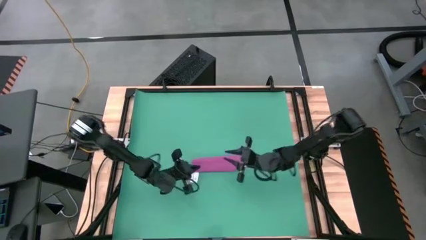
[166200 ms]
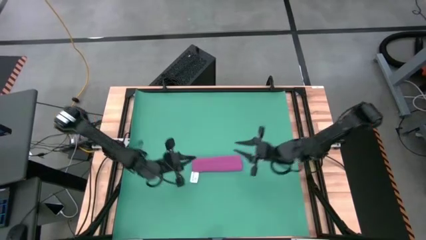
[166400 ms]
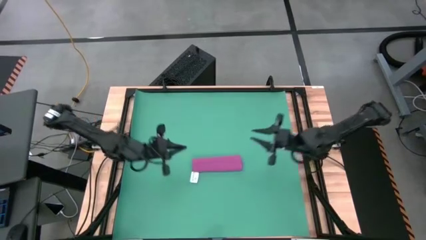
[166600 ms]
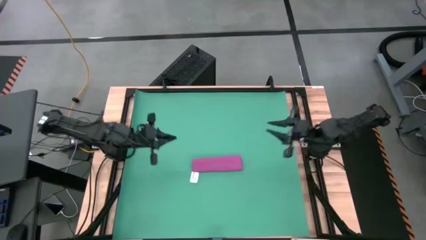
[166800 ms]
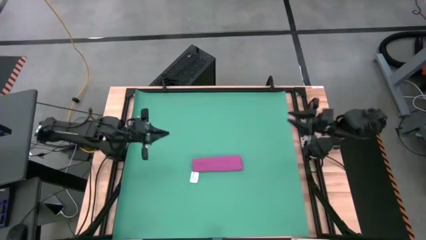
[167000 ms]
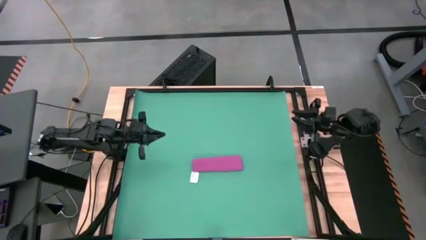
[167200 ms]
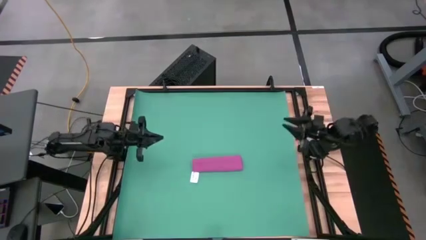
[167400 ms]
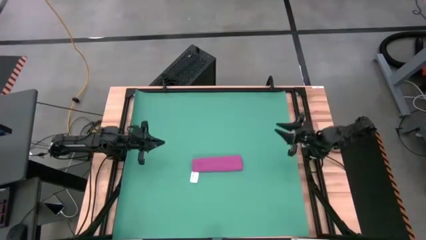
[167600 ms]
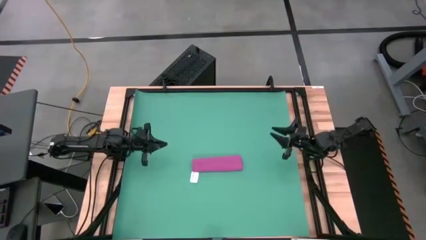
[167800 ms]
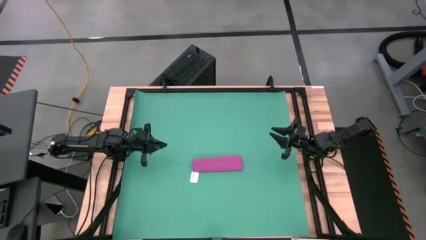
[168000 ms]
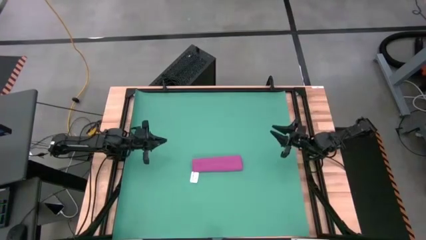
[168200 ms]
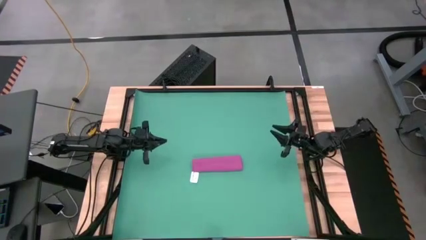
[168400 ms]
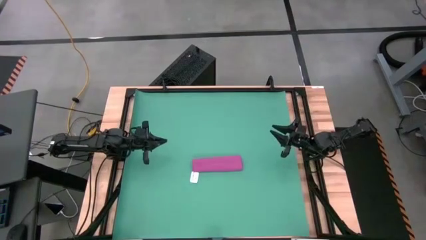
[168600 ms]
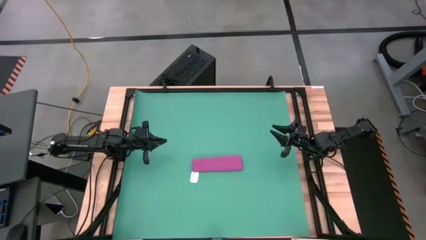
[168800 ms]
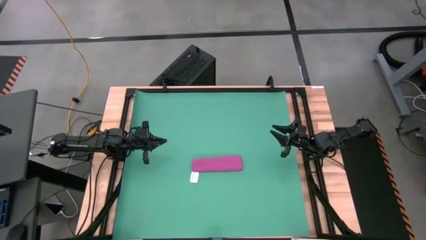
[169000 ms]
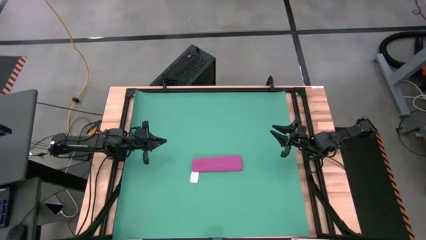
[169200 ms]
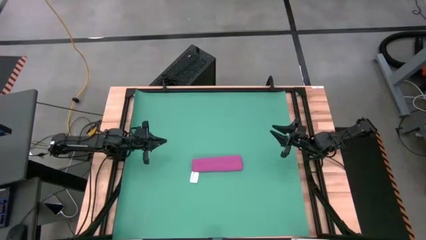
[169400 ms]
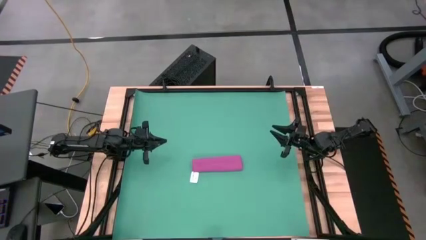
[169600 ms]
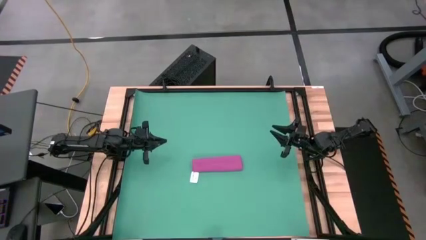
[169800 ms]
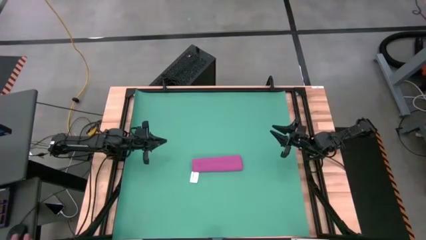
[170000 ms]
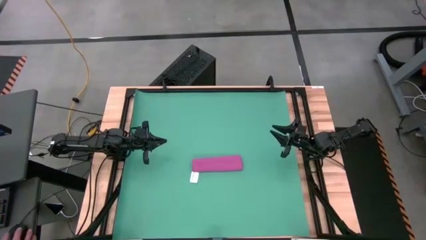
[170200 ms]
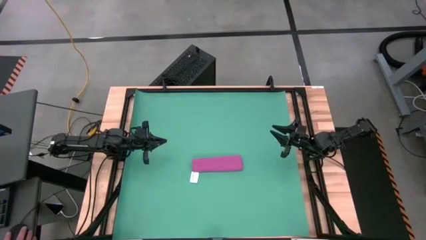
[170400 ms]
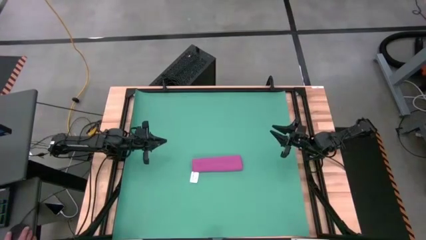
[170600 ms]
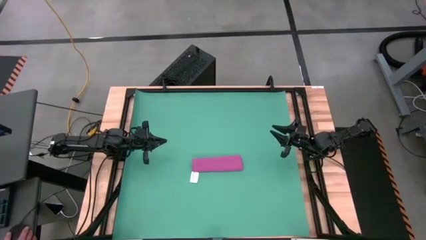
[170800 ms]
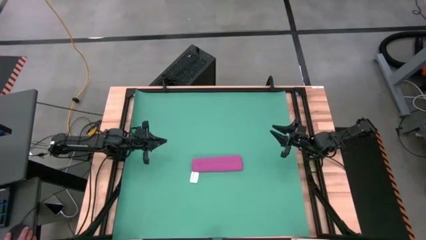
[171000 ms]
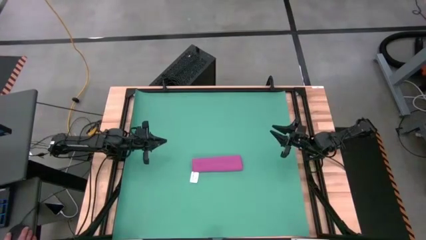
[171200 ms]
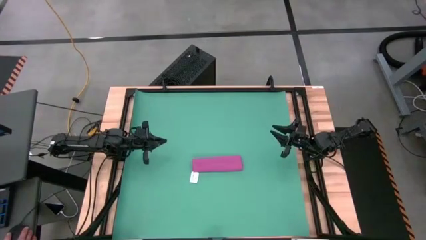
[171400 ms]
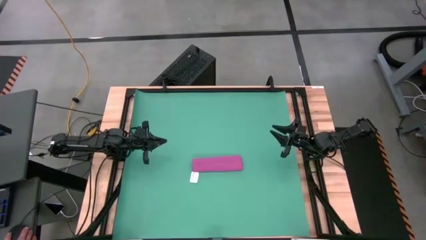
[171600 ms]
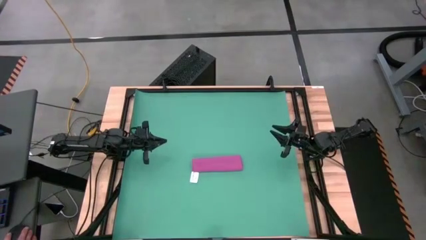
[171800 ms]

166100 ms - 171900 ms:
Task: Roll towel
Return to Home Position

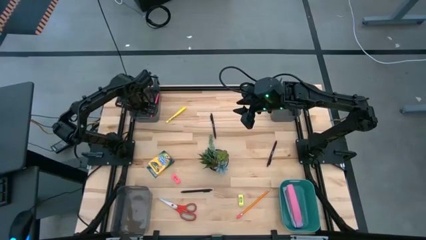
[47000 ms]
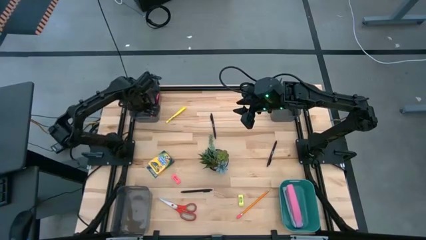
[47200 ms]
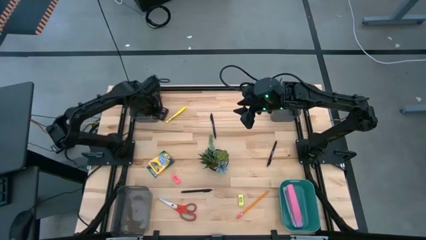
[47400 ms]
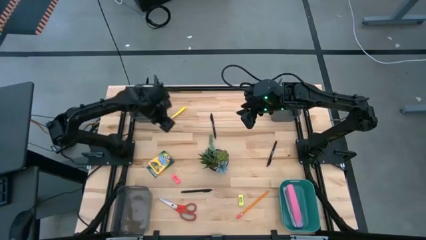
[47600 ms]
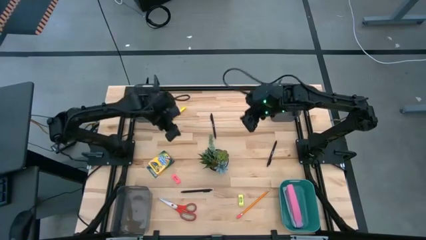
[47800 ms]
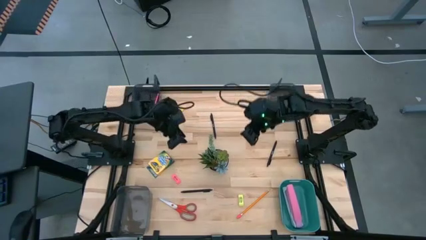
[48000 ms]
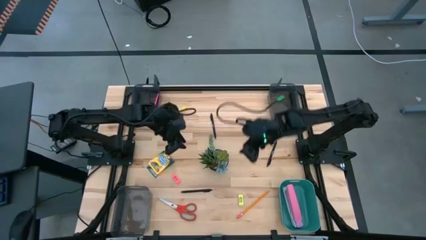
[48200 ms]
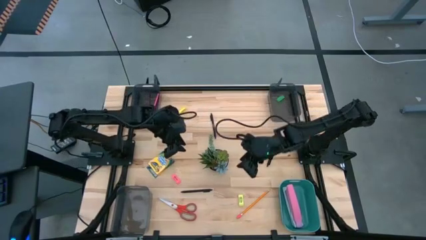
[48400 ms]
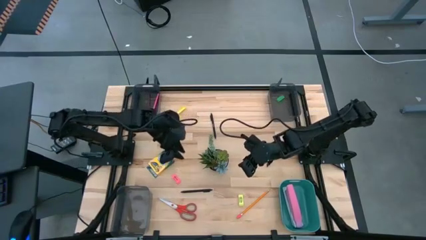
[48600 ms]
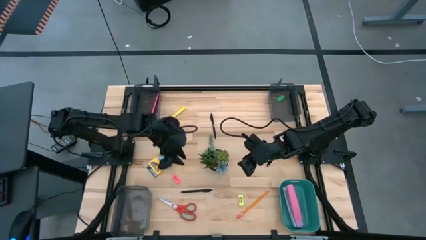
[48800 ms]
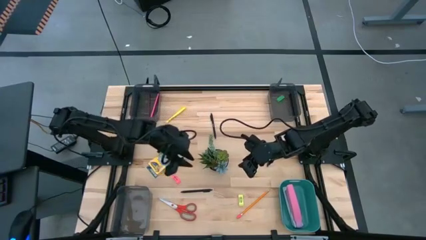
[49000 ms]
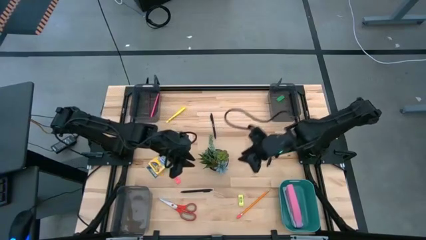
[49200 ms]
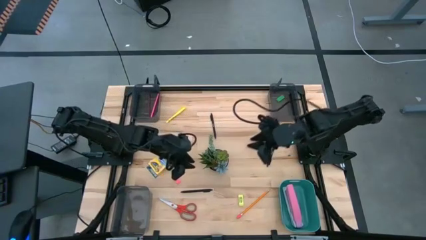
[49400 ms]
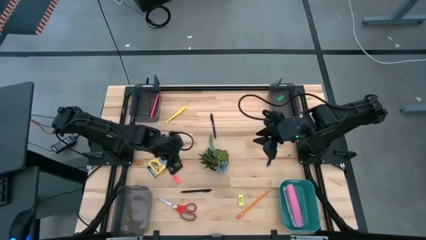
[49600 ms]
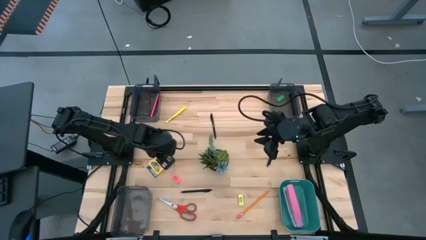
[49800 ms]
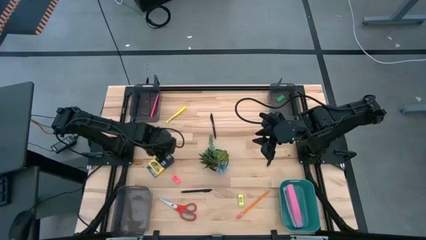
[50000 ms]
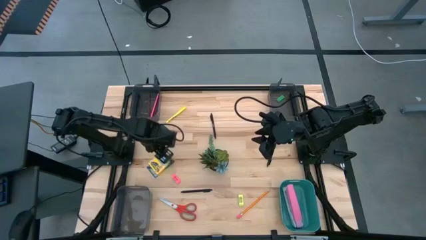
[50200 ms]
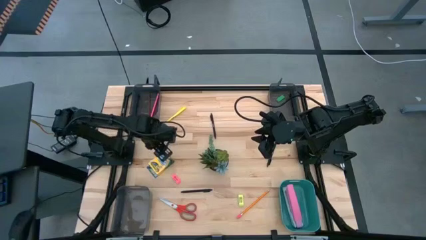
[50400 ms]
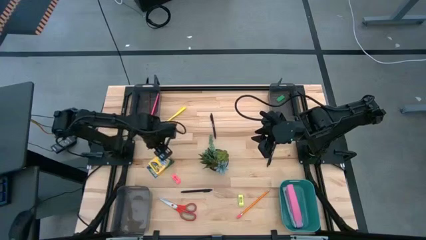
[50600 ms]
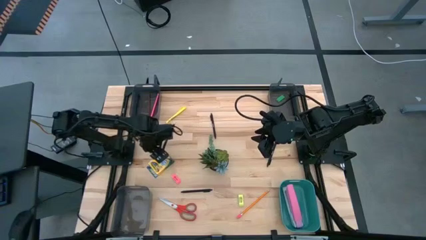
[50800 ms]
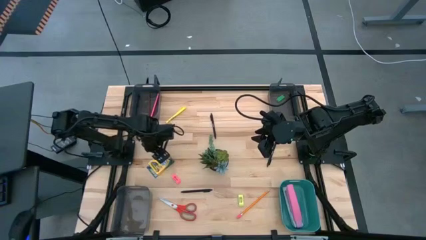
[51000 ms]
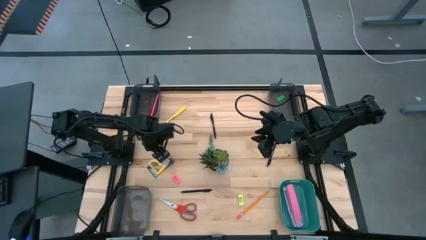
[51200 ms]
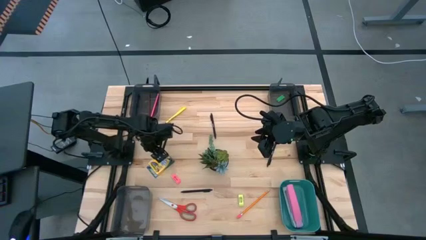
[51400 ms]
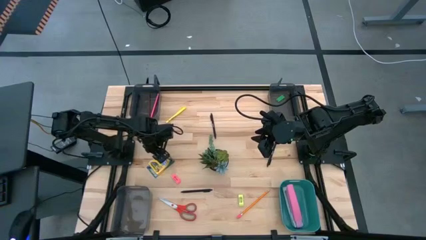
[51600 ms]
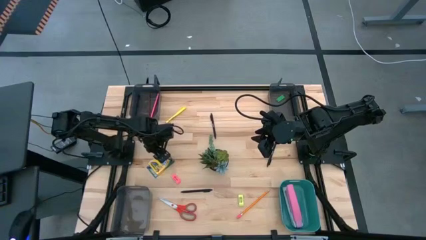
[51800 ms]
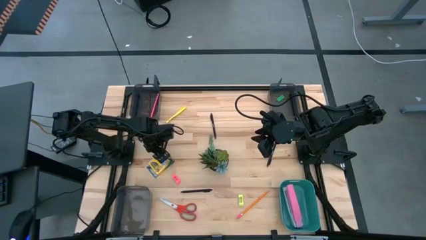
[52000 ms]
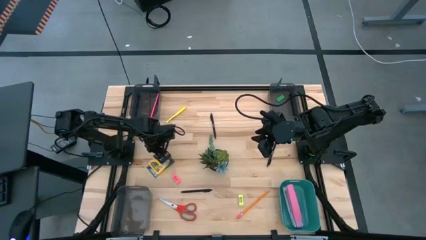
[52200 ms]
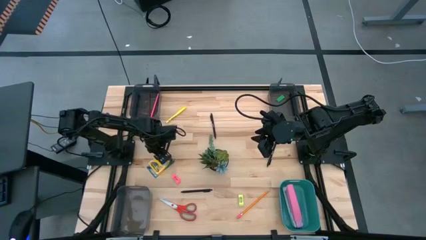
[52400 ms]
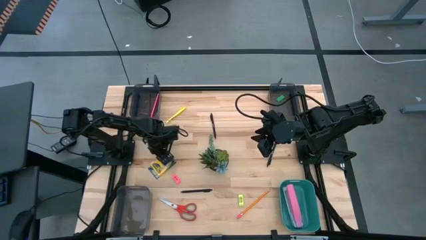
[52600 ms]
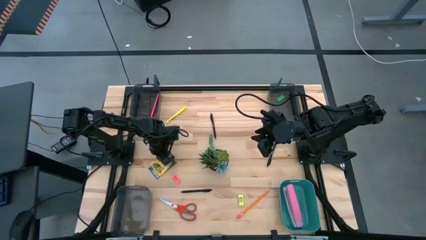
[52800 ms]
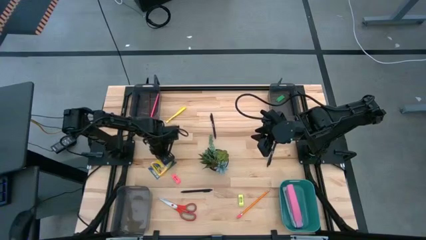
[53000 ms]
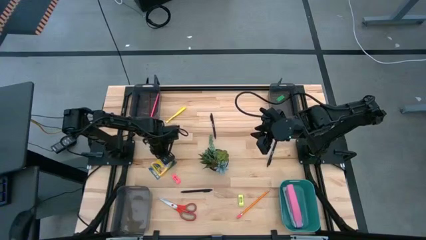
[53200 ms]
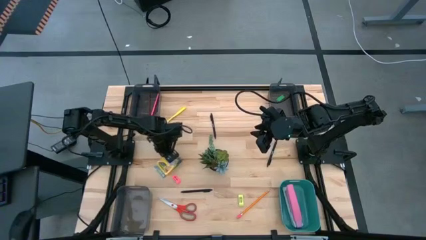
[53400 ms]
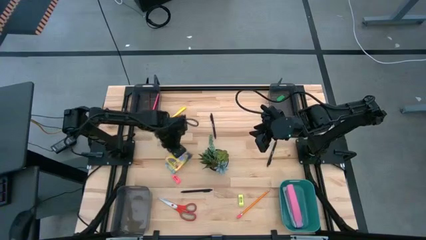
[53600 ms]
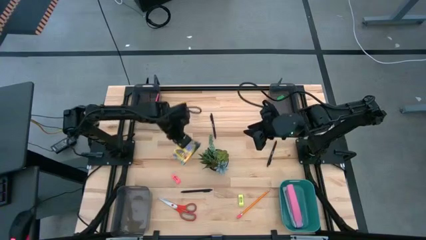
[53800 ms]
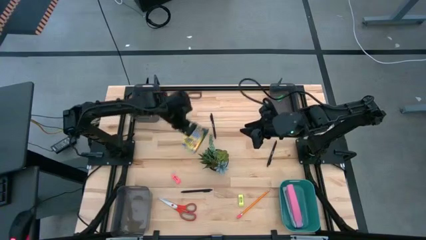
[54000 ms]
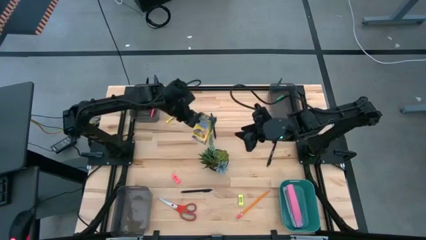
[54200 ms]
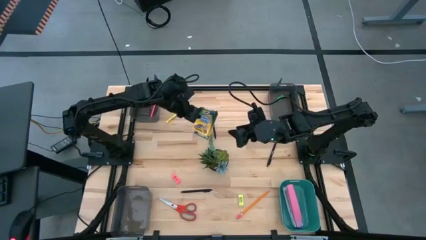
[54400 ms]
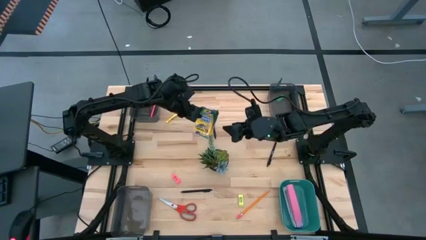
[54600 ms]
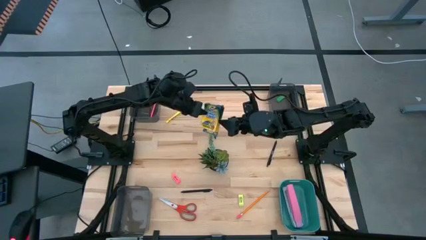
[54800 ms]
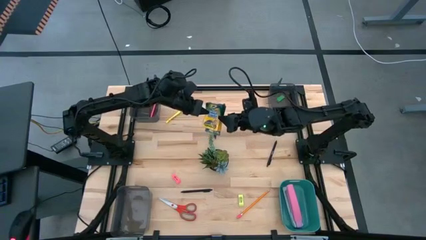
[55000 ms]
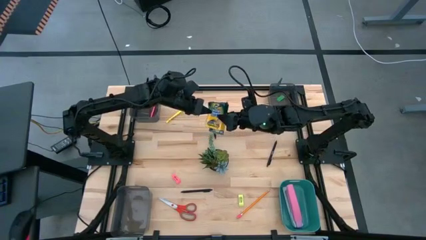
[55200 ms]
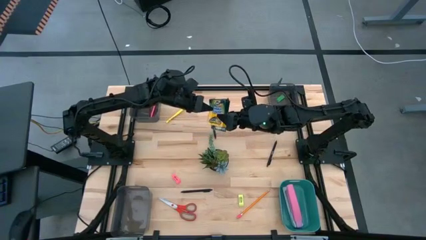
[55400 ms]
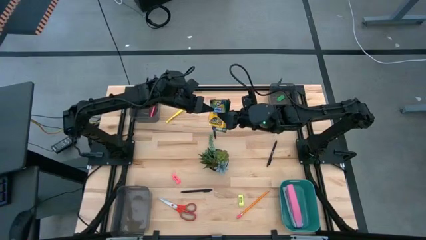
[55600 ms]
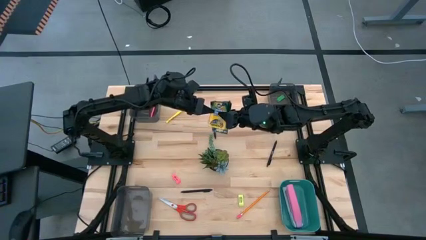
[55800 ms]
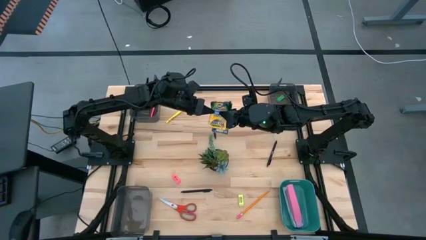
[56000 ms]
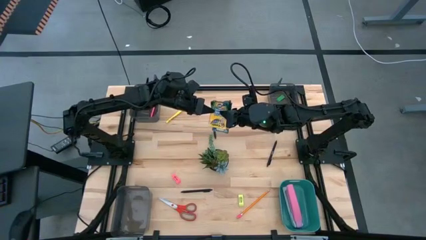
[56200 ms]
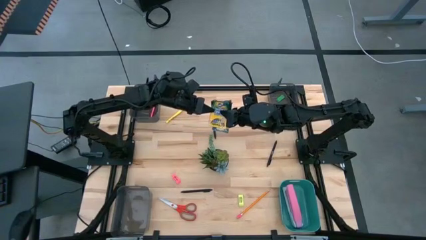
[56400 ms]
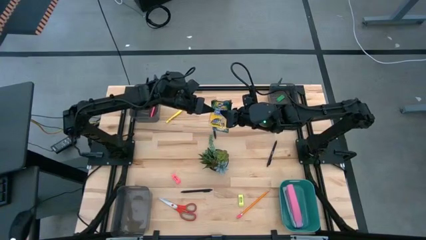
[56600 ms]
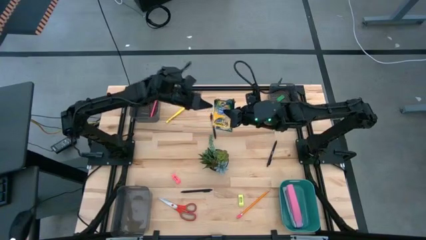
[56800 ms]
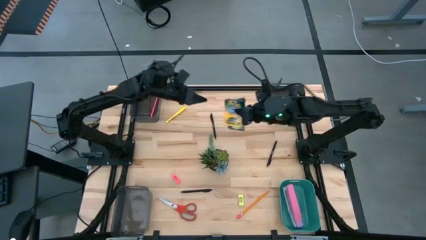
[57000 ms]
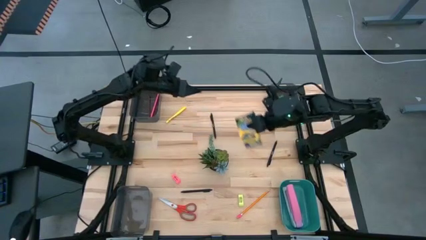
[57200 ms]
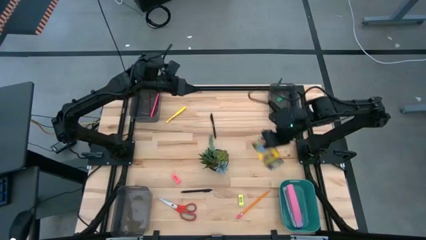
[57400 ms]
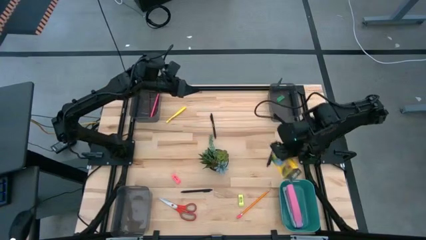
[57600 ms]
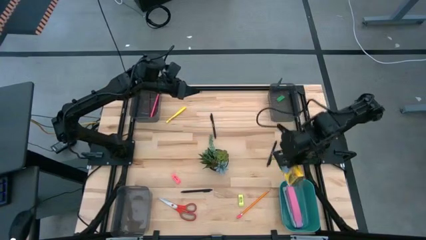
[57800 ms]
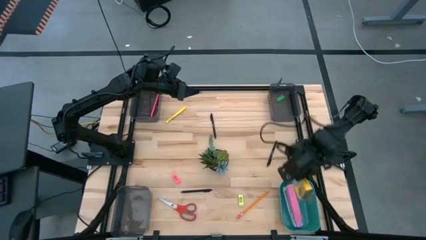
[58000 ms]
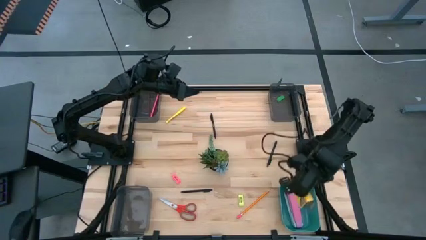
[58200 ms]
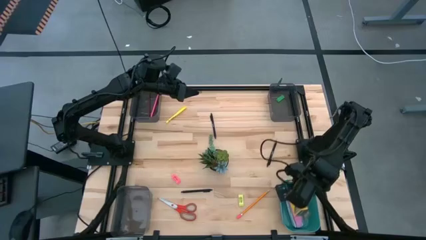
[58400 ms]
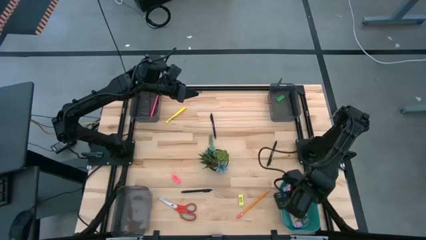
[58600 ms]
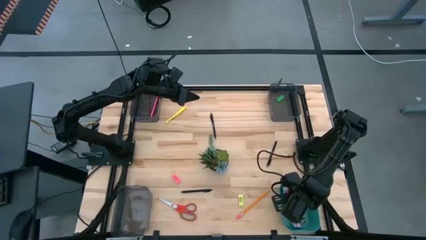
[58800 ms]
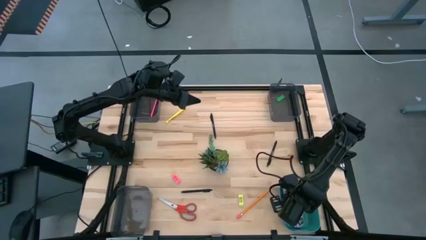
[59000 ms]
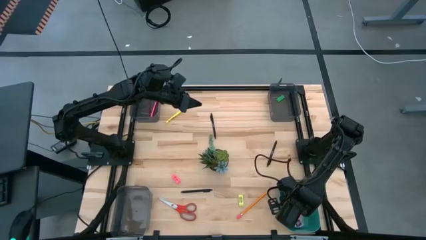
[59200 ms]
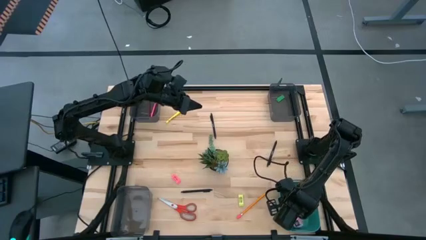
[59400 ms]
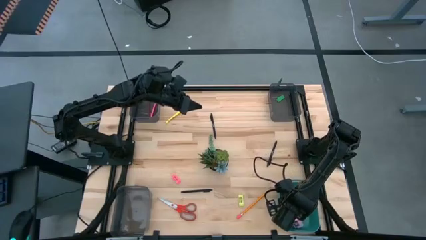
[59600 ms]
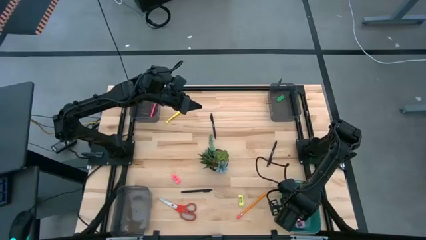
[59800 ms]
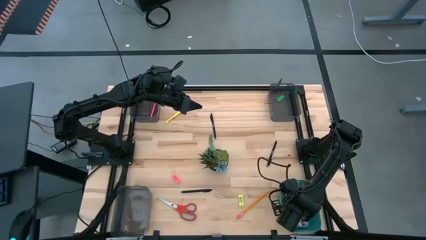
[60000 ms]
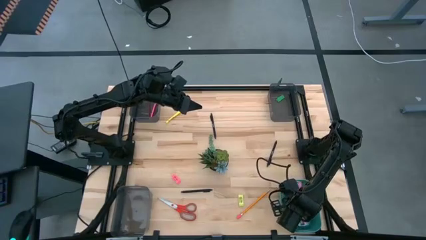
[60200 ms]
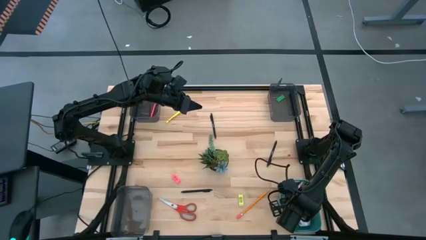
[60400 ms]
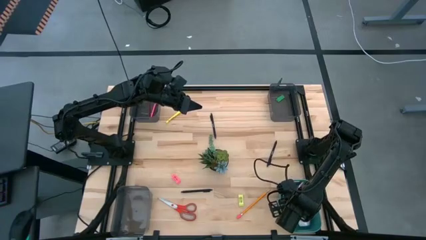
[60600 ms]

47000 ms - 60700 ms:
Task: Sort crayons/erasers/pens/pencils in bins
Put the crayon box into the green bin
